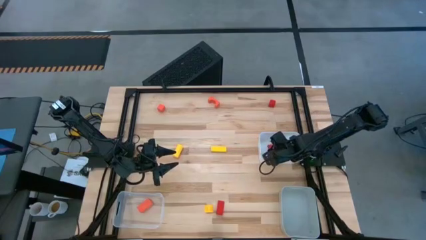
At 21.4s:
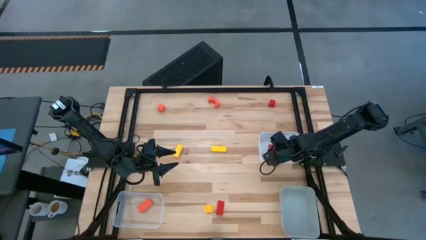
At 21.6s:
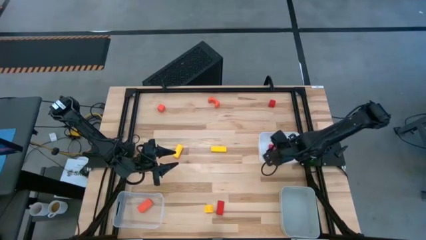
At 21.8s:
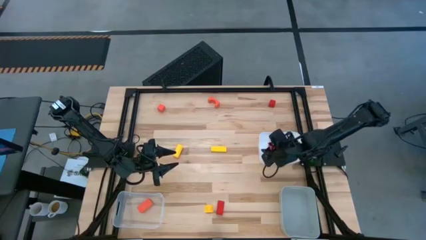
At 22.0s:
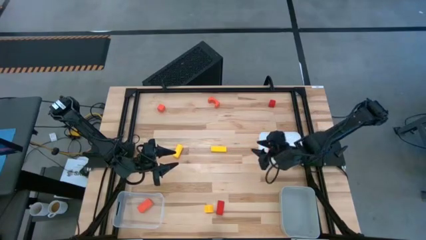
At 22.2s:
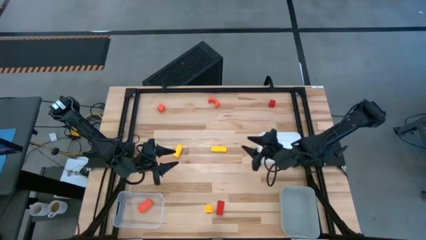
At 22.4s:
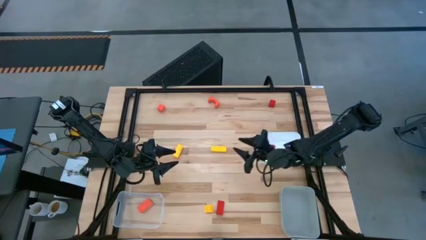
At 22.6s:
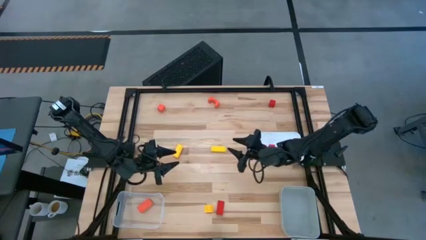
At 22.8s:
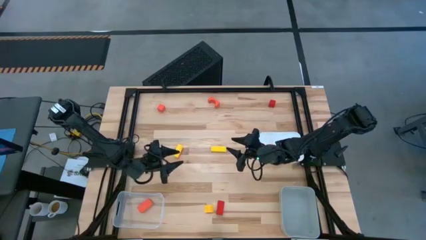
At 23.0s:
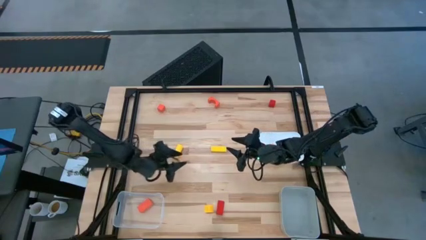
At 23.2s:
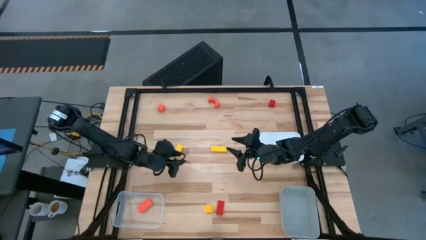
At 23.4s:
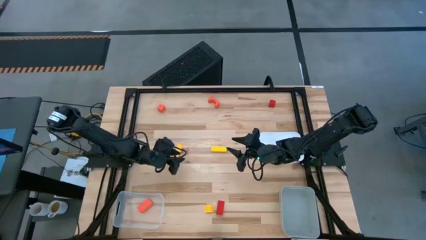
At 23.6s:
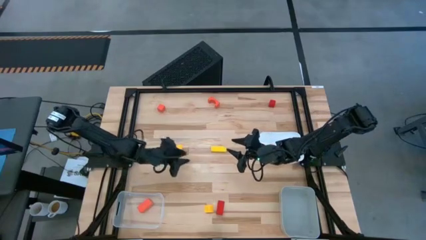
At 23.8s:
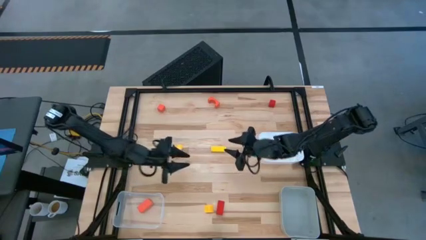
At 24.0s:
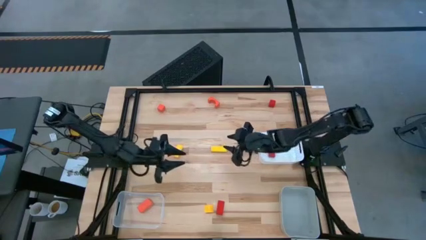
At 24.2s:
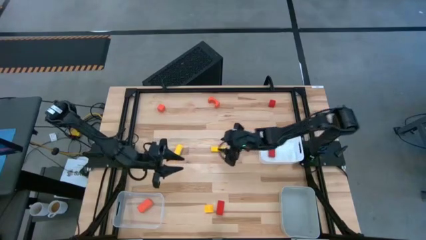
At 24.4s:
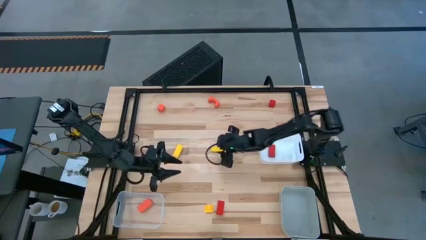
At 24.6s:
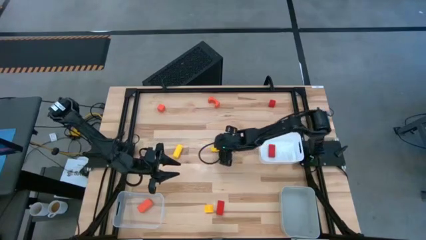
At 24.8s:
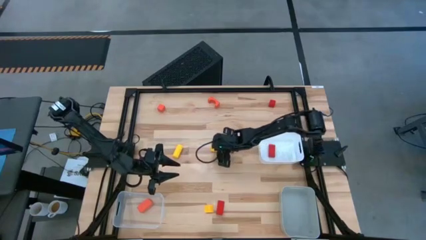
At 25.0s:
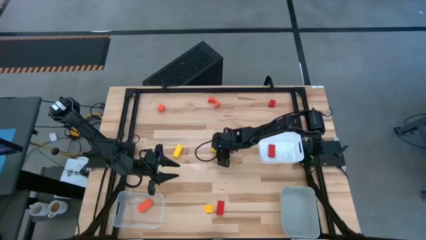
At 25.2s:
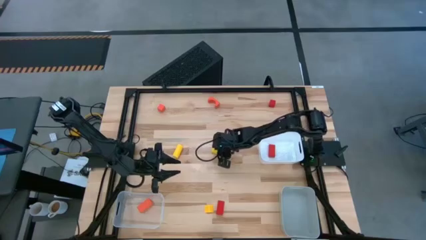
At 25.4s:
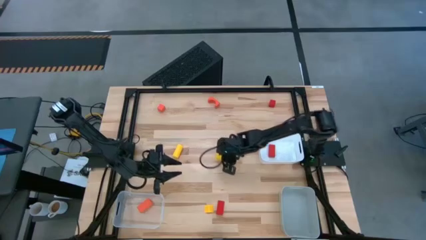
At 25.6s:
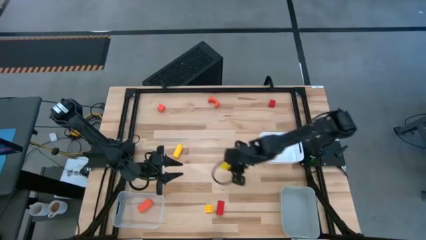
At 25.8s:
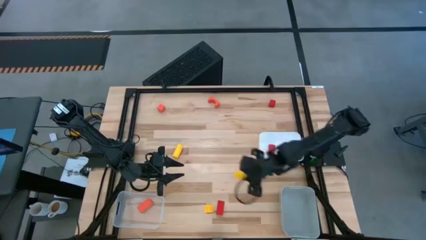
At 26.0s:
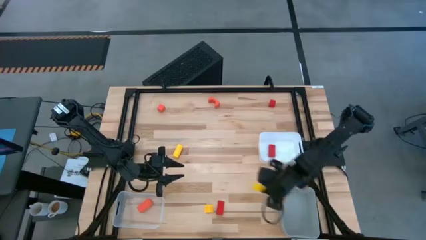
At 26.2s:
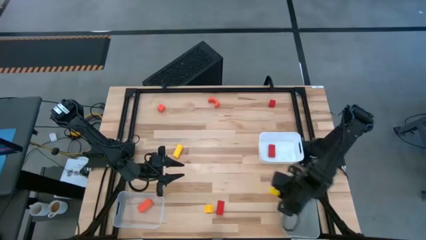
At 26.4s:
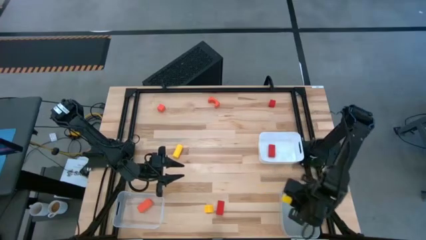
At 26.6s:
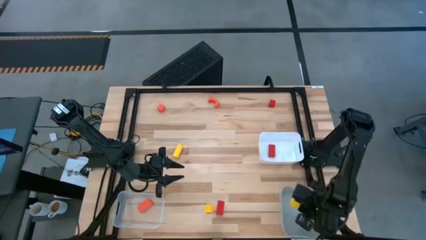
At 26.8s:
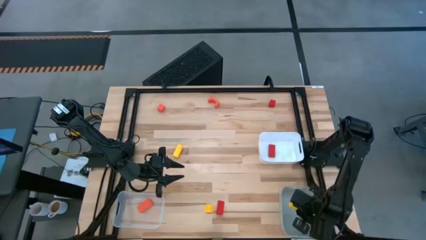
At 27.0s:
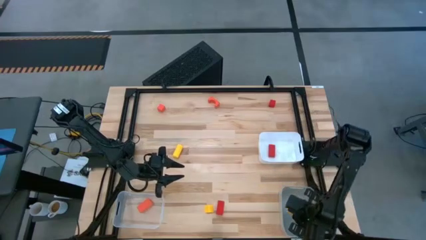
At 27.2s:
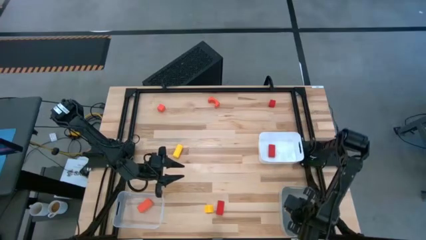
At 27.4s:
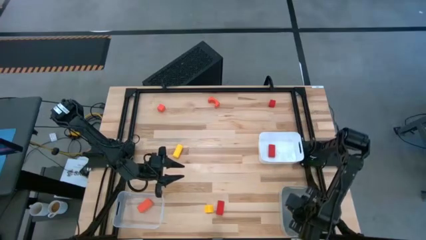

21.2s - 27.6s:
Task: Sort & place blocks by color
Put the top right yellow block into the gray bin

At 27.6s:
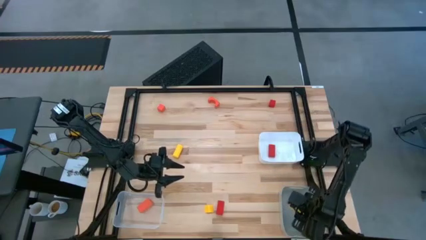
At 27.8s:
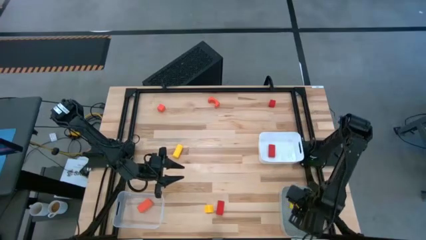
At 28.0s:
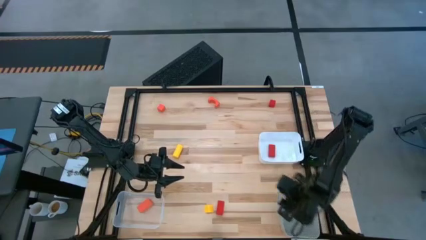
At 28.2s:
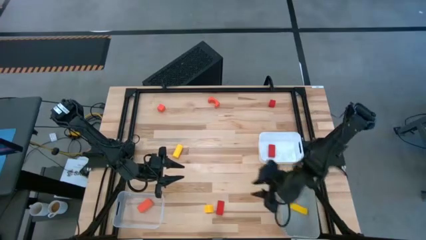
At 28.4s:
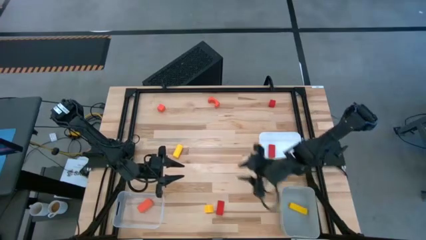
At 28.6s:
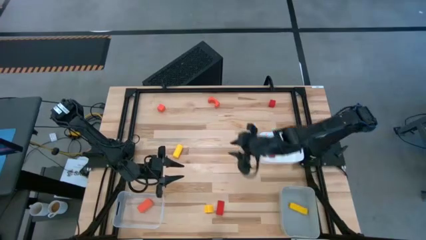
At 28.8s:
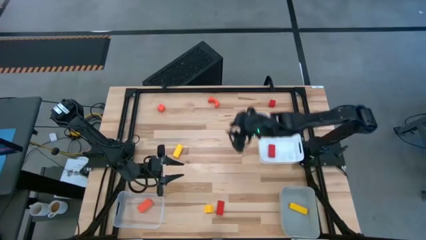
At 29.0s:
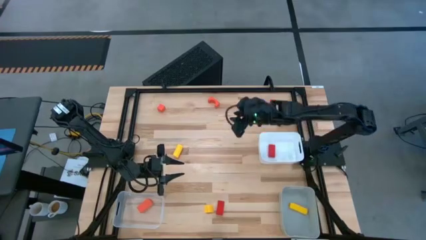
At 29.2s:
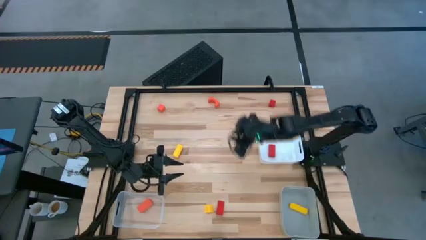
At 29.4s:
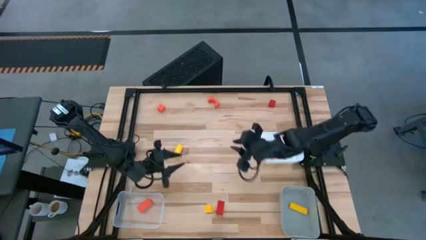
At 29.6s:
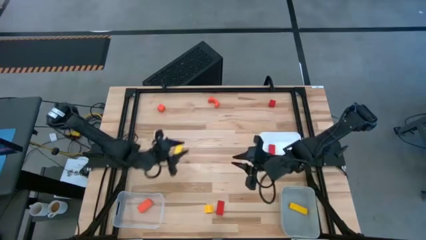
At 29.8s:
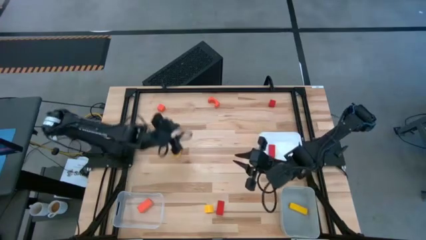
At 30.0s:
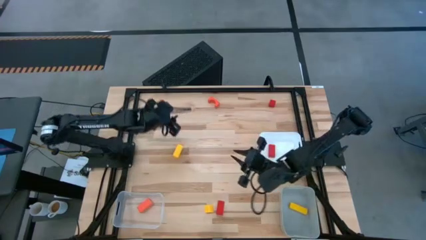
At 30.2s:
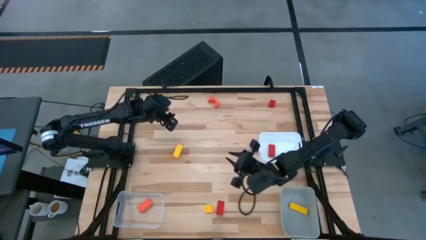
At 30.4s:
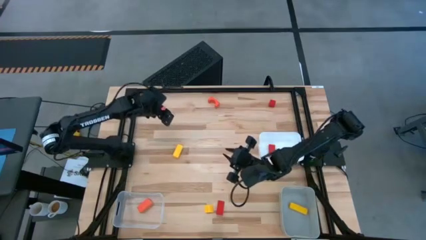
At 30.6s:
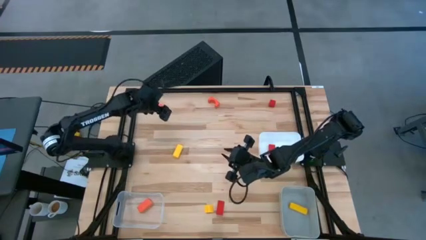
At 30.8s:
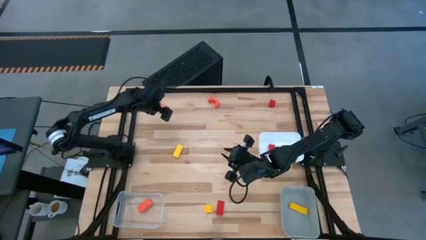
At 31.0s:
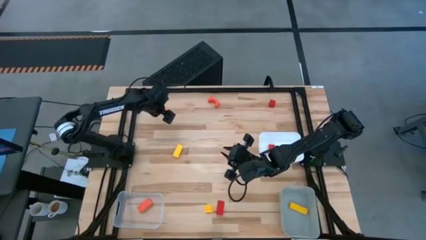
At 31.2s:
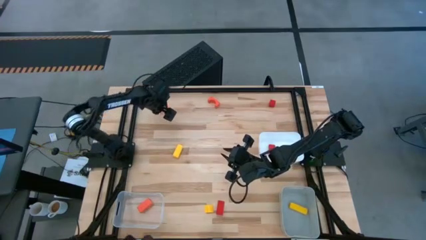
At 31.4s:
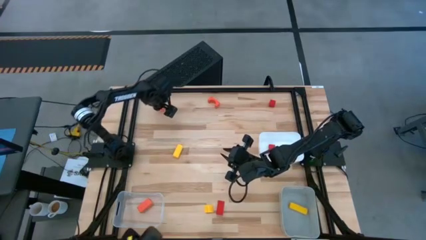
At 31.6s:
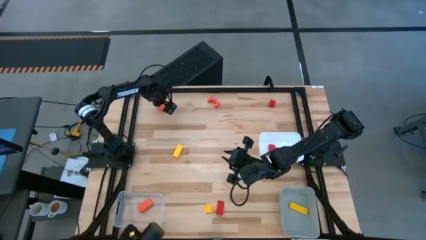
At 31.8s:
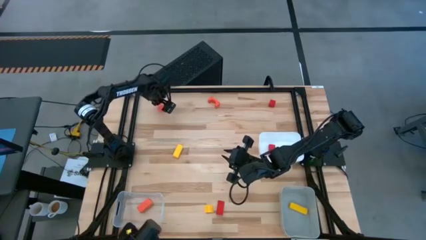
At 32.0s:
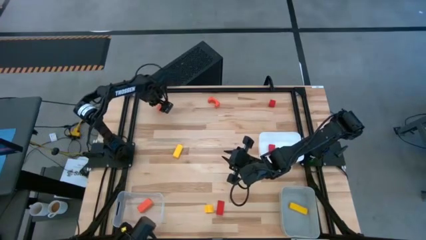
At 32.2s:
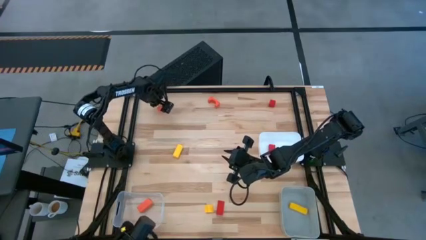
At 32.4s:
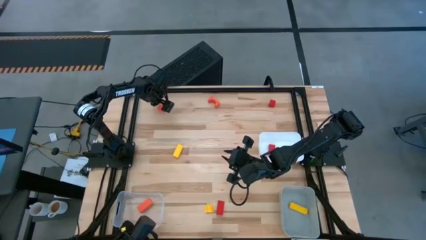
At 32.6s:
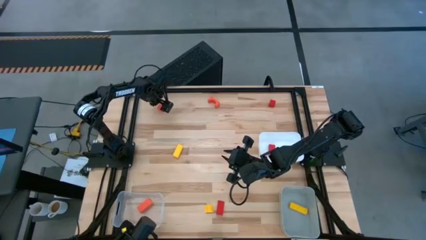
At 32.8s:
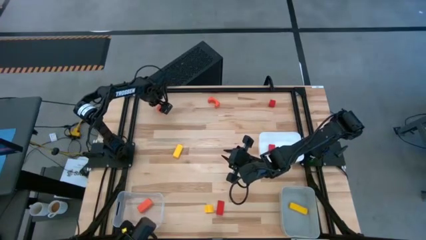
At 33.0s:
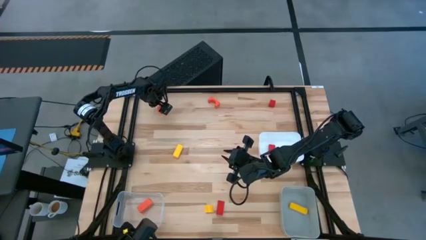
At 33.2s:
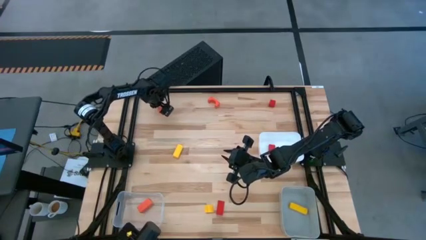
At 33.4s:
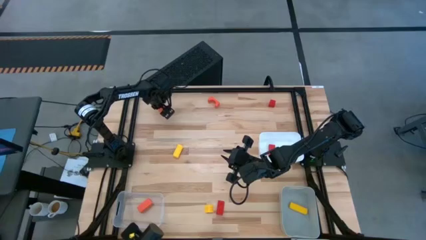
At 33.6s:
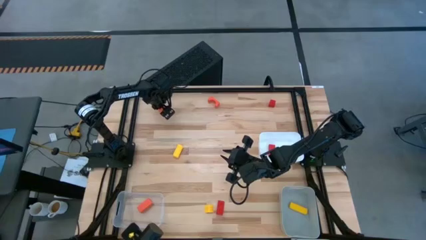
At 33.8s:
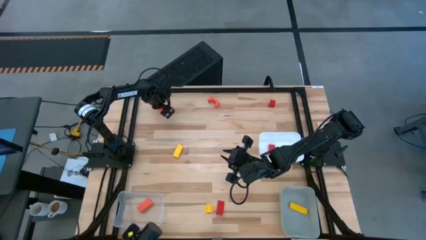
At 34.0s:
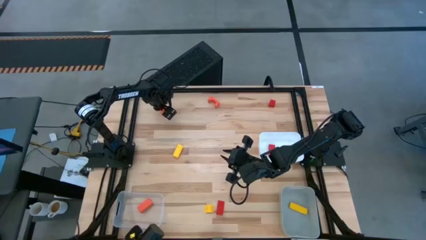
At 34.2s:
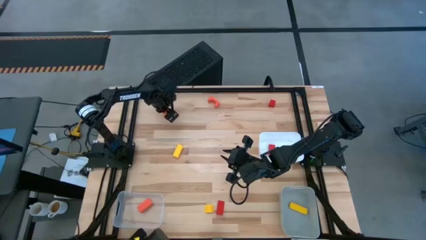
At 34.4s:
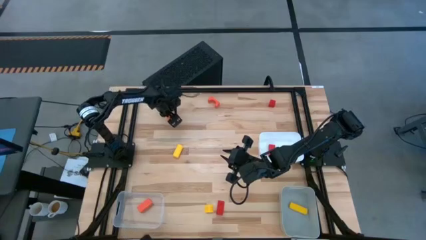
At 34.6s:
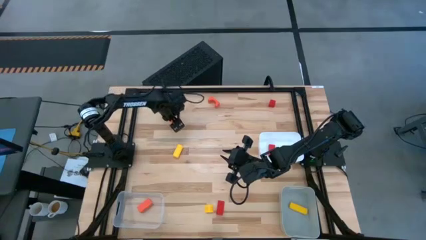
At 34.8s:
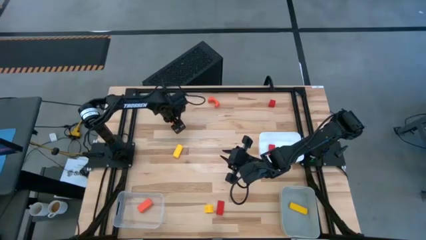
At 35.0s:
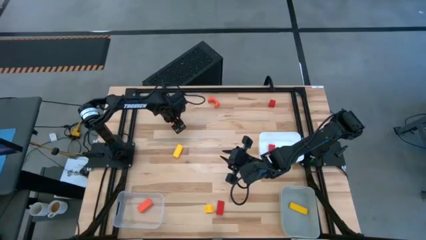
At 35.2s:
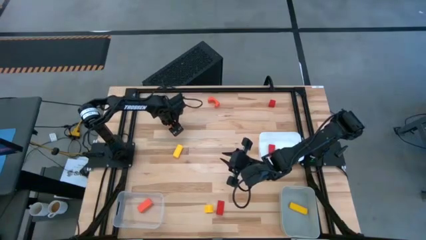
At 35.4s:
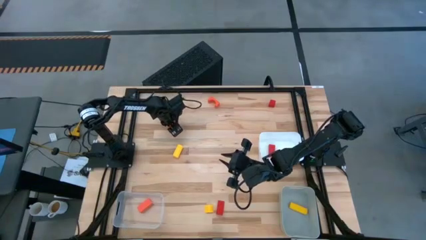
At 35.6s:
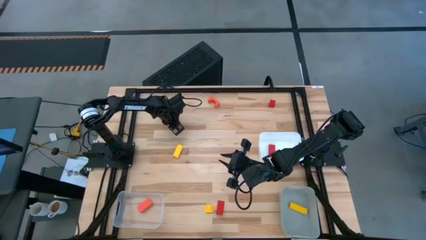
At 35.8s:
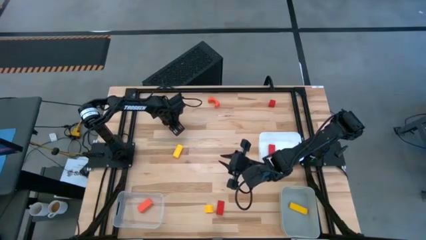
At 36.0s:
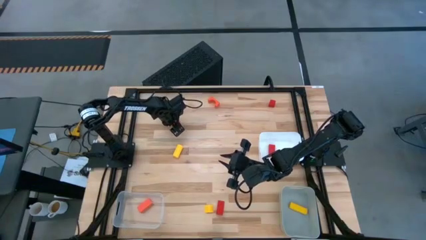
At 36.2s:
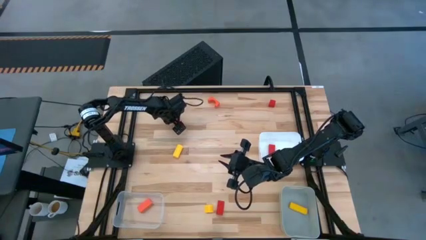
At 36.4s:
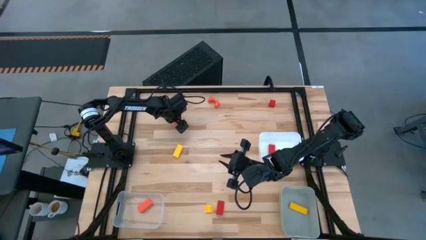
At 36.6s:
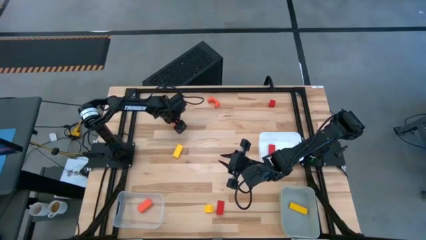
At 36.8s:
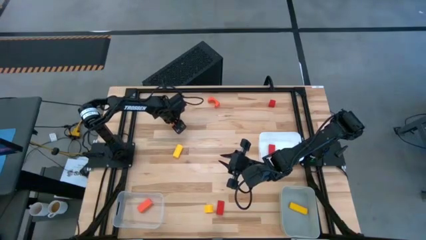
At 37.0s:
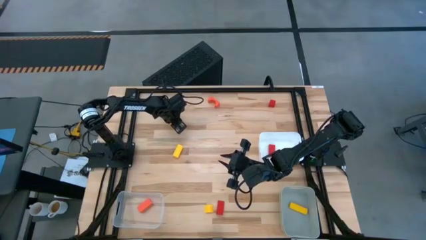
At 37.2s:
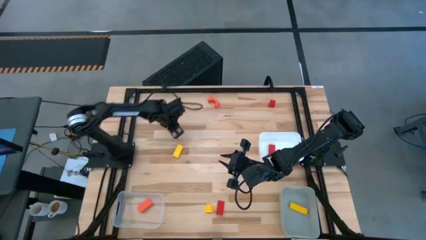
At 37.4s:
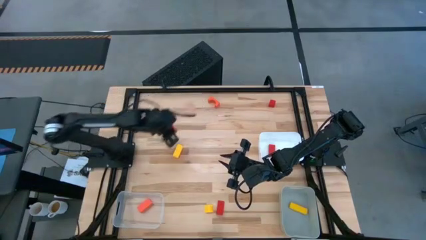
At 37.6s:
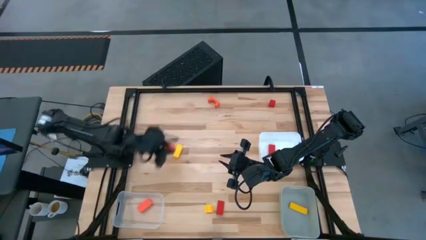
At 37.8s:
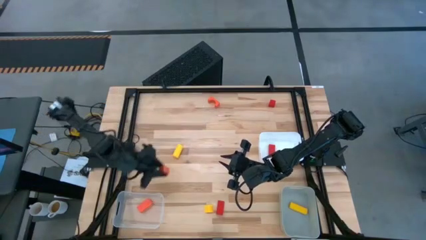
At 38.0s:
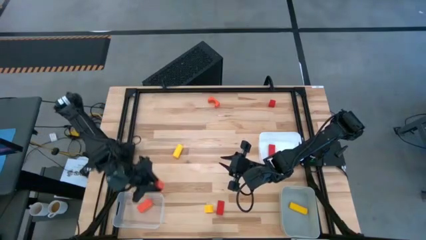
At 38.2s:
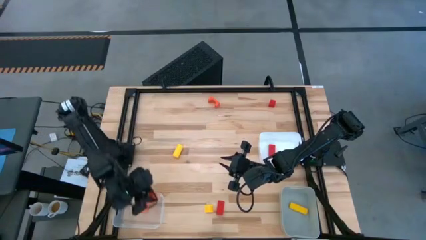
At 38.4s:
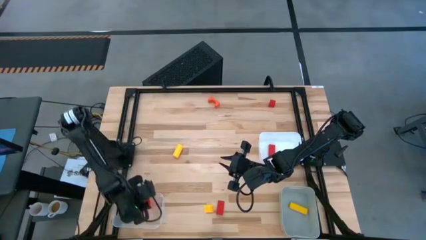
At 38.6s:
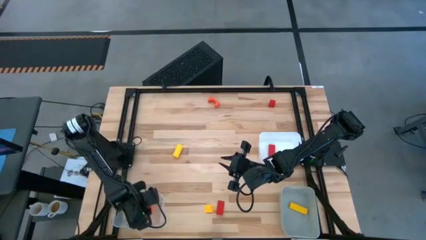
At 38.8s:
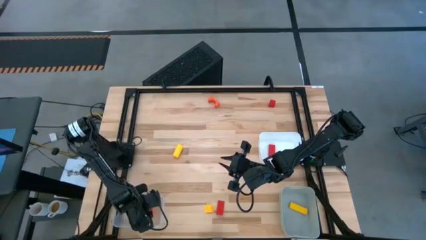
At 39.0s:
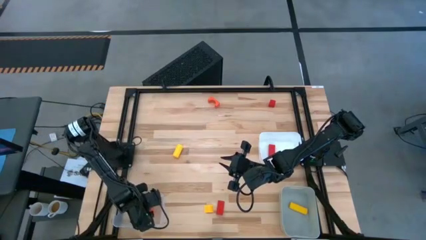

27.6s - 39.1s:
Put the left orange block into the transparent bin
